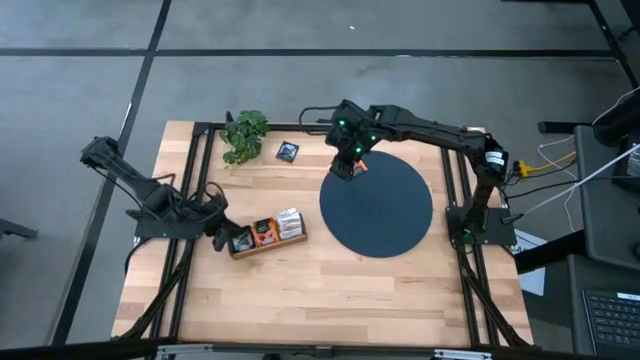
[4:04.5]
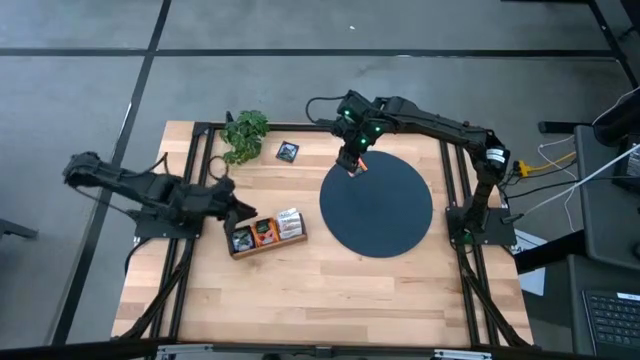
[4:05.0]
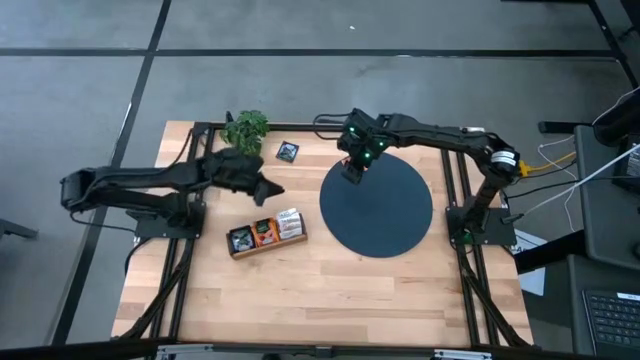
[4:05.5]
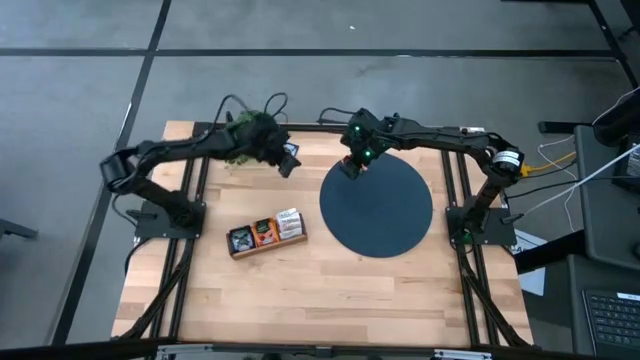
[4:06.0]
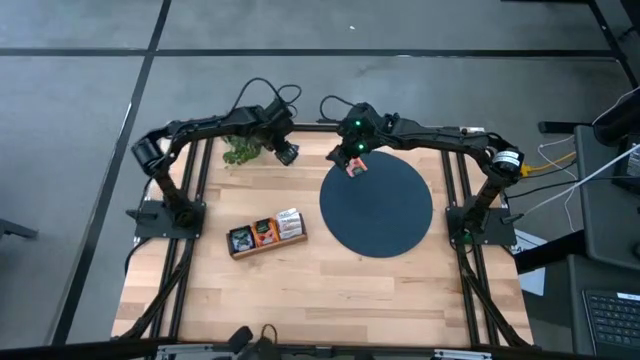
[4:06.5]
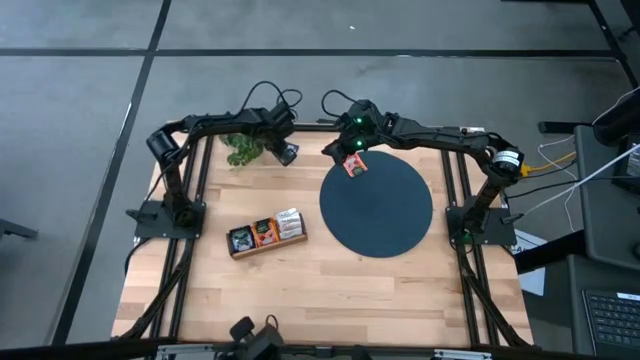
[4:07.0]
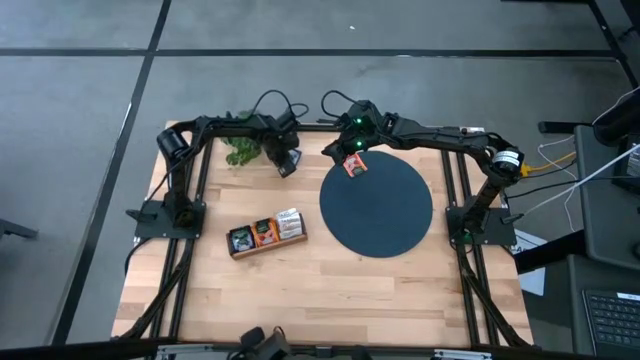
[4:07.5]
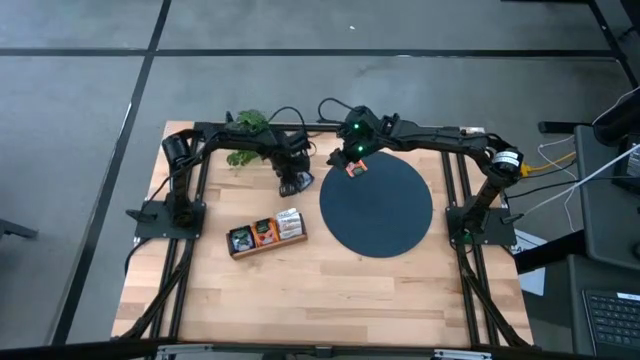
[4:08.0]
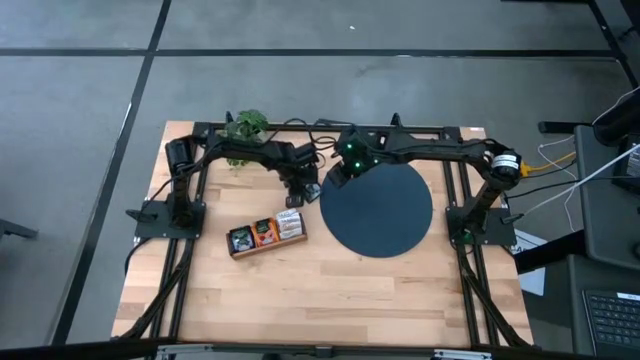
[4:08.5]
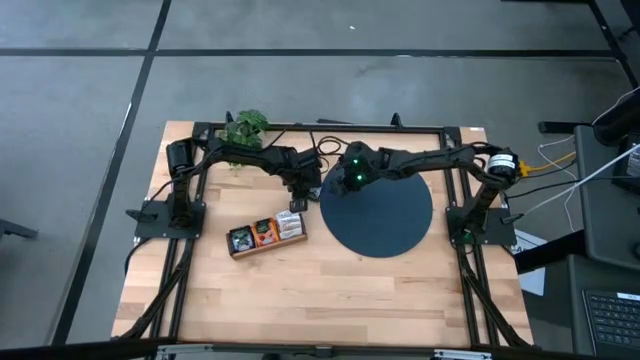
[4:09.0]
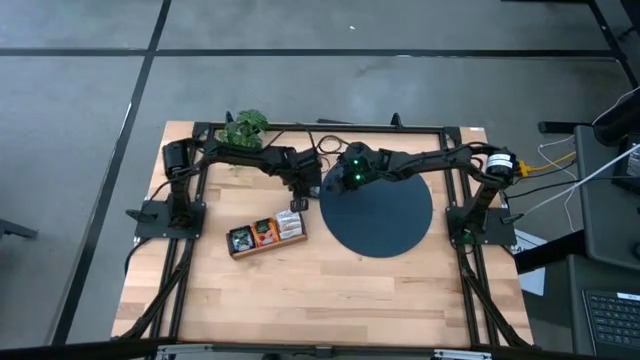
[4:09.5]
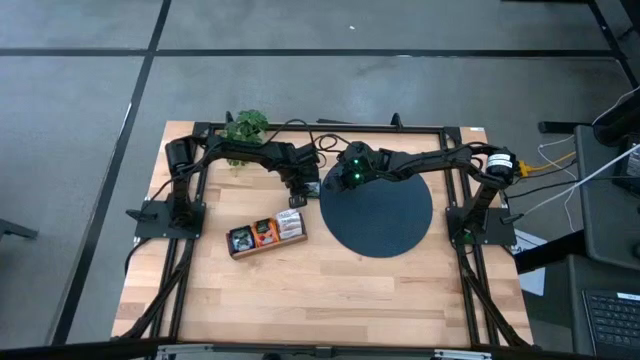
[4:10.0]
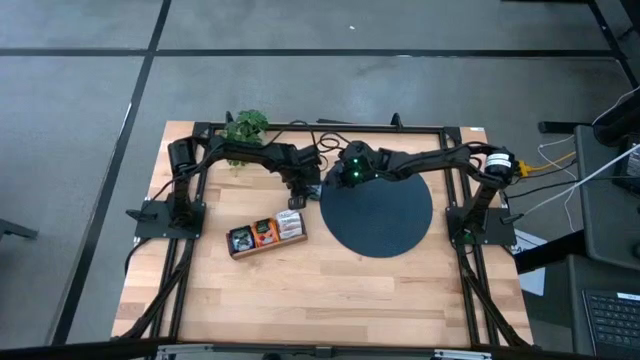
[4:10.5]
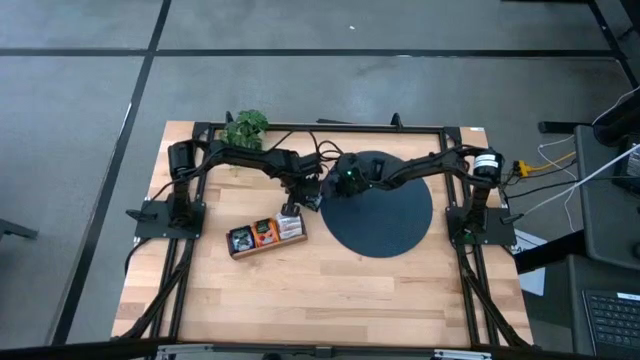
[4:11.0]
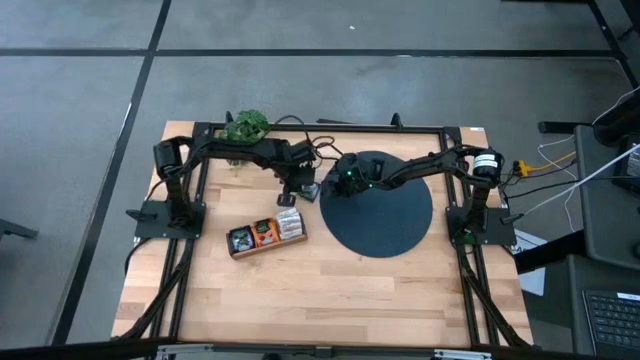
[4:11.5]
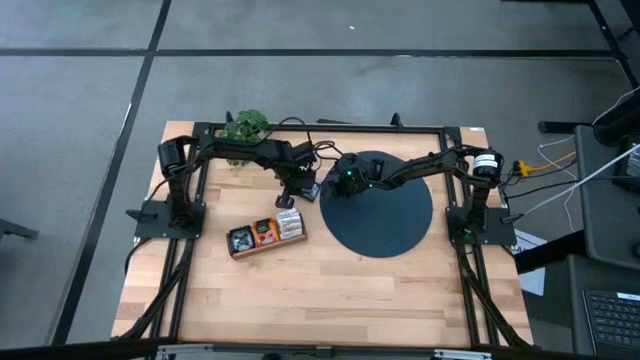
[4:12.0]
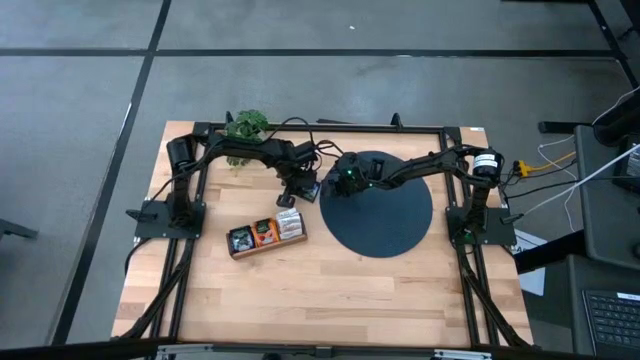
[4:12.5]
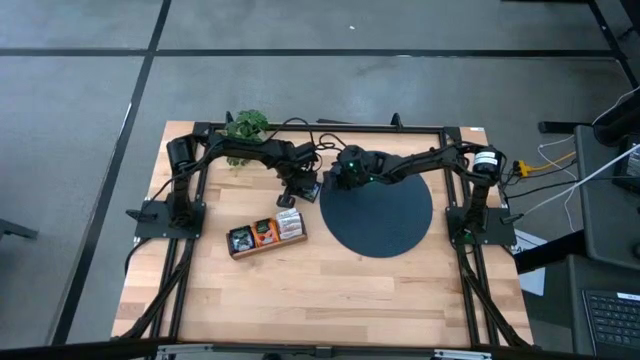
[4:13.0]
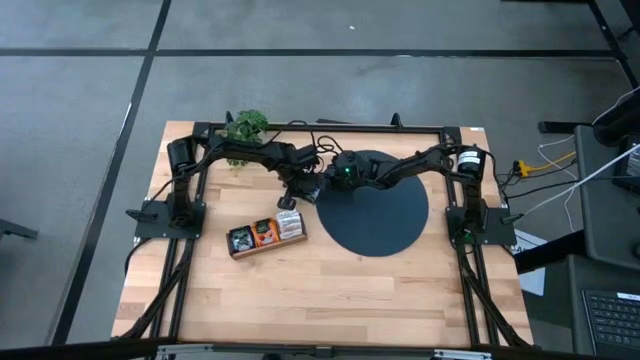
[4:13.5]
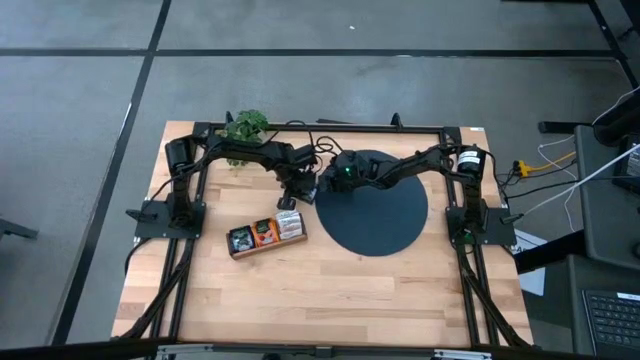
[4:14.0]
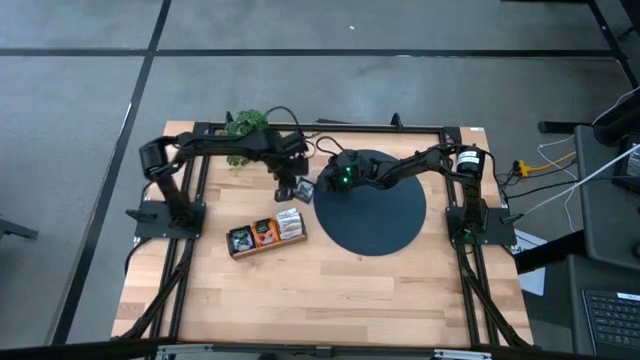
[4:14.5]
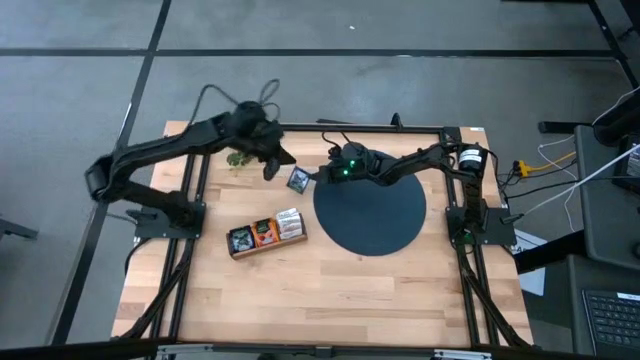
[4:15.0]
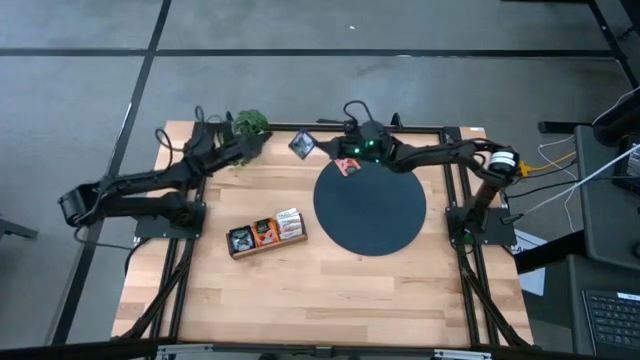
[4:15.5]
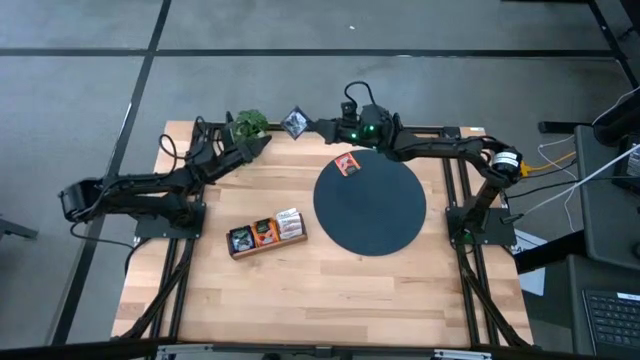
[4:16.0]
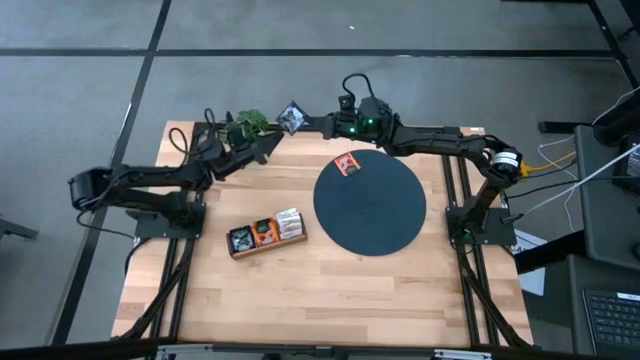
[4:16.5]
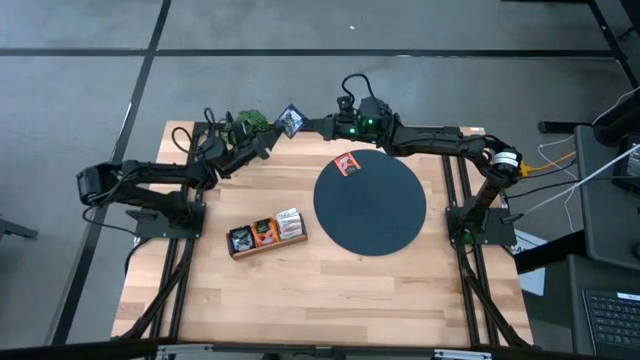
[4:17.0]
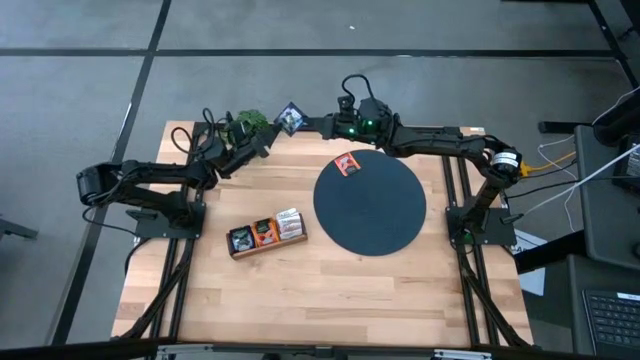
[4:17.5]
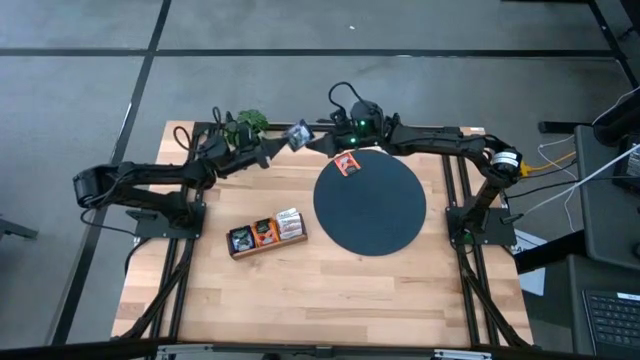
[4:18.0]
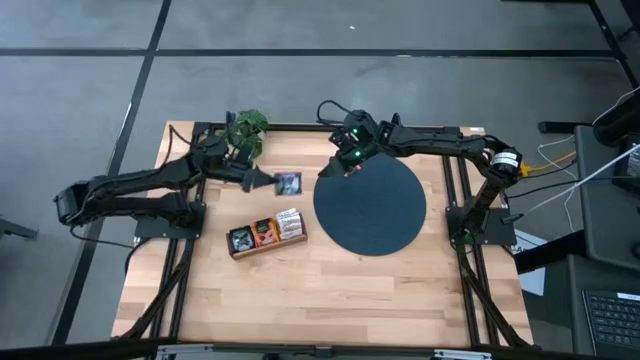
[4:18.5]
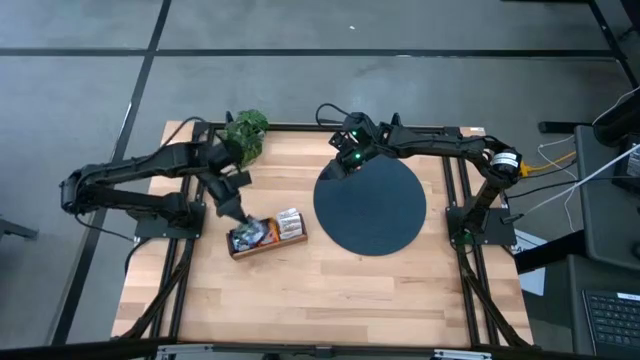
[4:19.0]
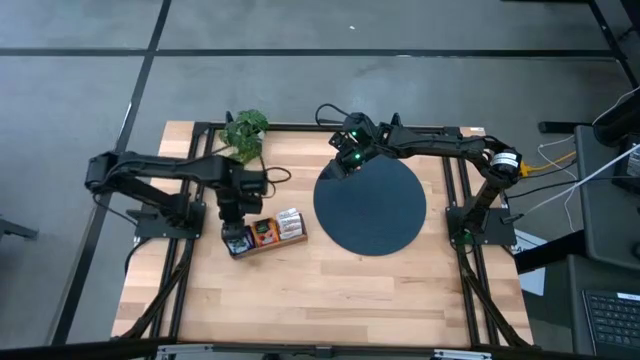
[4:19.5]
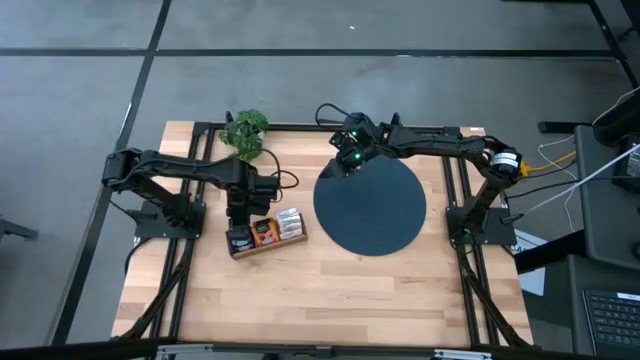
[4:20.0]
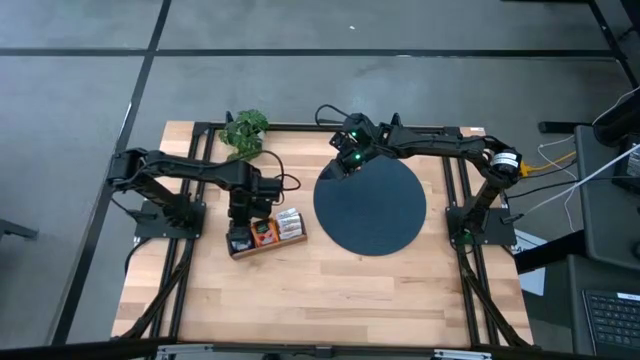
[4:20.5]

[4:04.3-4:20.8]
Task: Pick & Place Tea
Put the purple tea bag into the left section of the wooden organizer

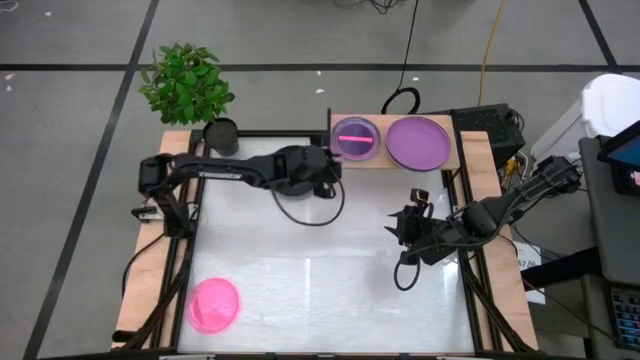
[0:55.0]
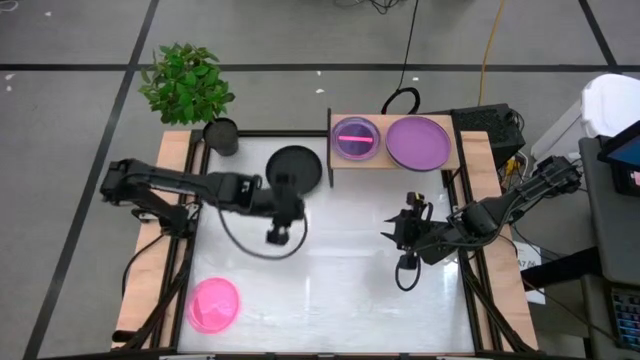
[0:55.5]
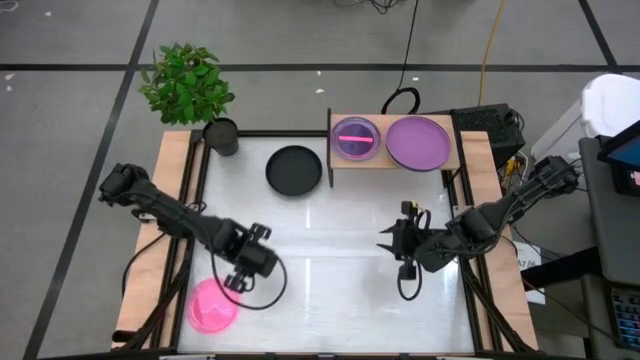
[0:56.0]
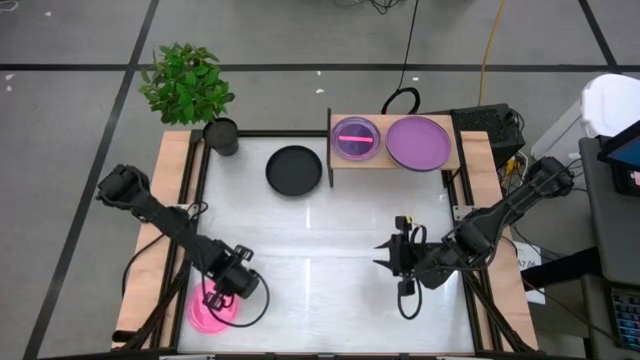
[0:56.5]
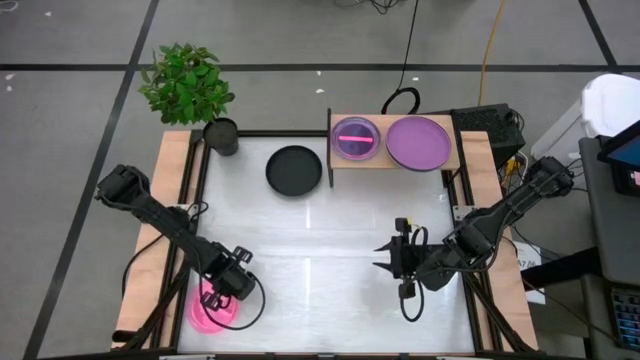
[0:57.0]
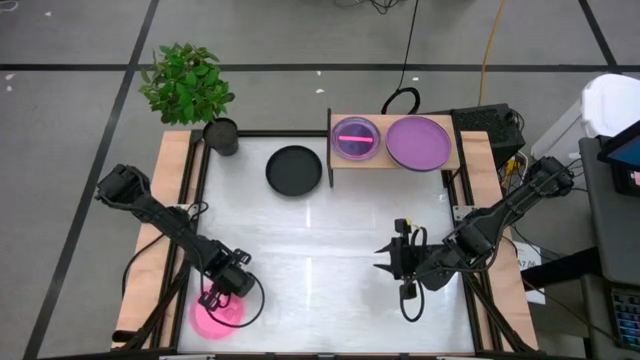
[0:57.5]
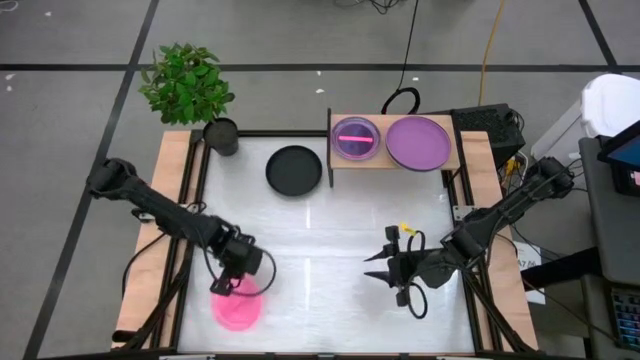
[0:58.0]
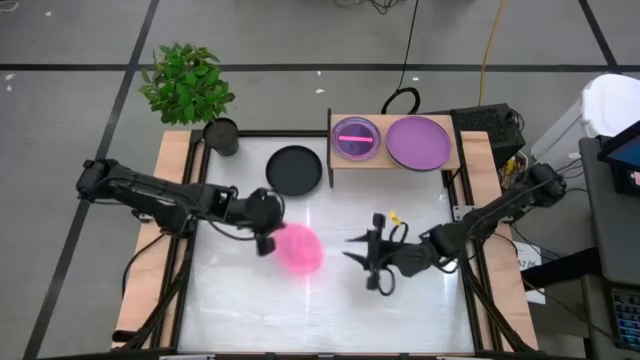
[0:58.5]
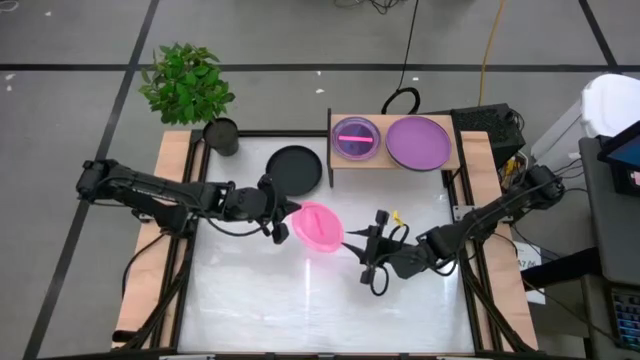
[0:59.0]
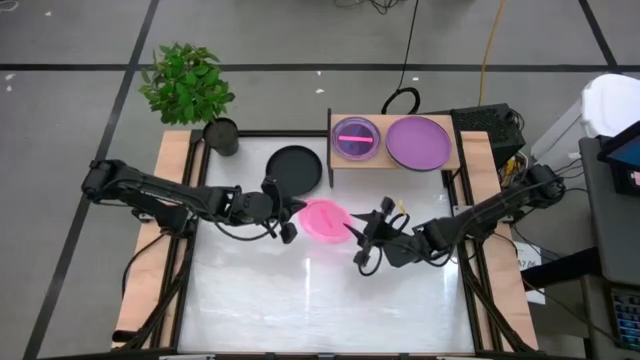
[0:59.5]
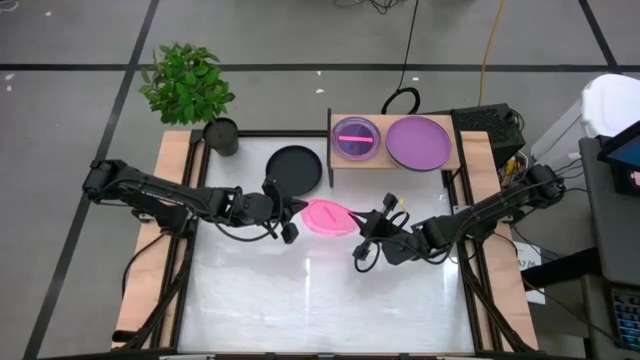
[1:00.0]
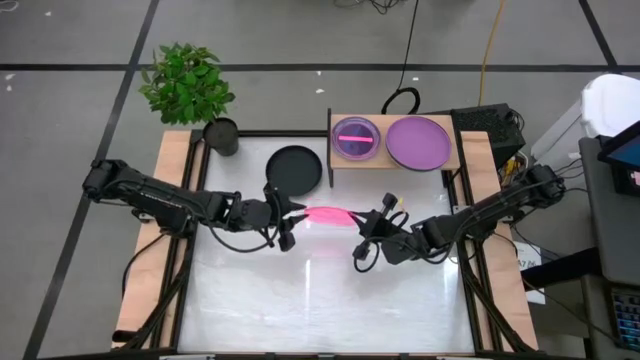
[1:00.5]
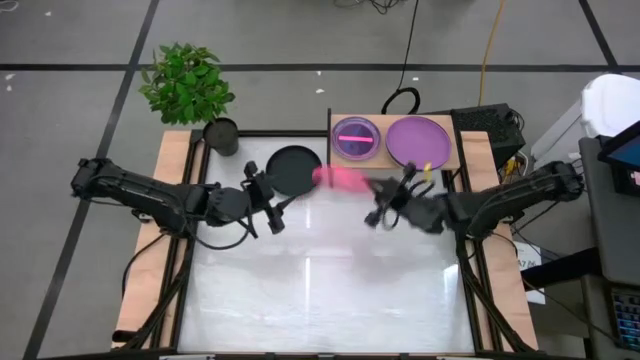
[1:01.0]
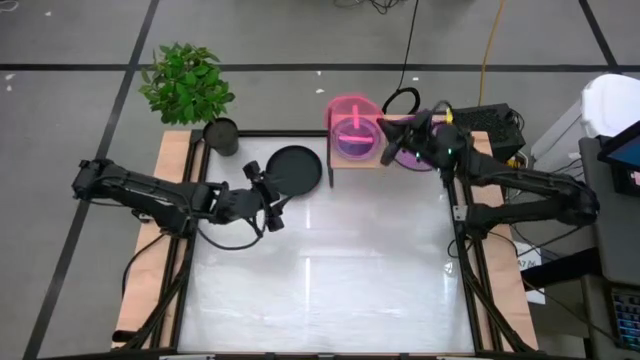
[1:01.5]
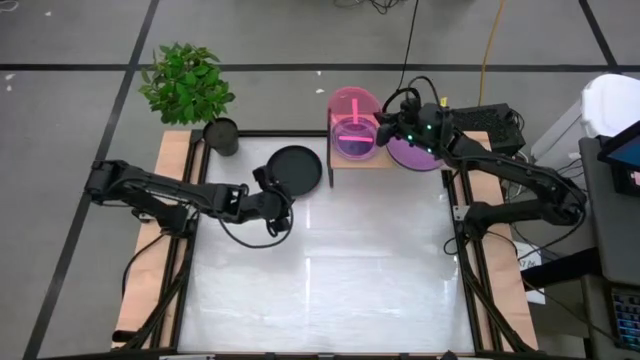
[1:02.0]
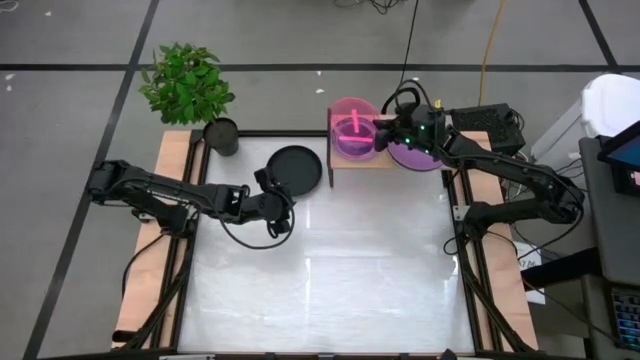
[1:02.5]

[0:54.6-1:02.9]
Task: Place and stack plates onto a shelf
Stack the small pink plate on top of the small pink plate on the shelf
